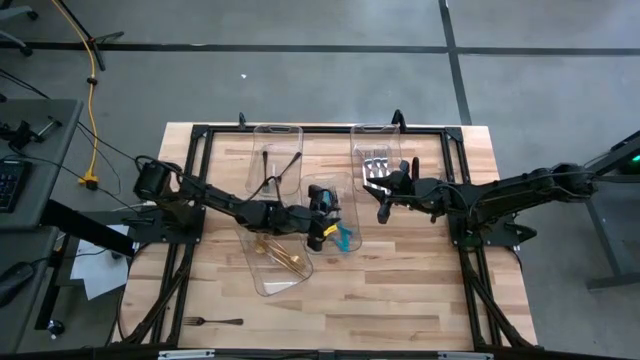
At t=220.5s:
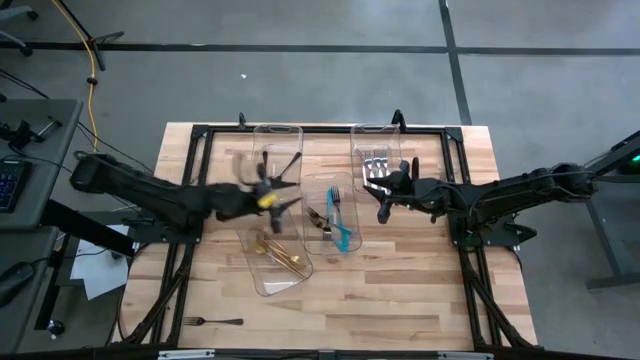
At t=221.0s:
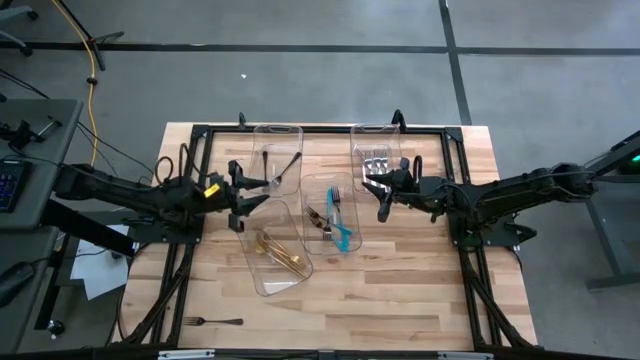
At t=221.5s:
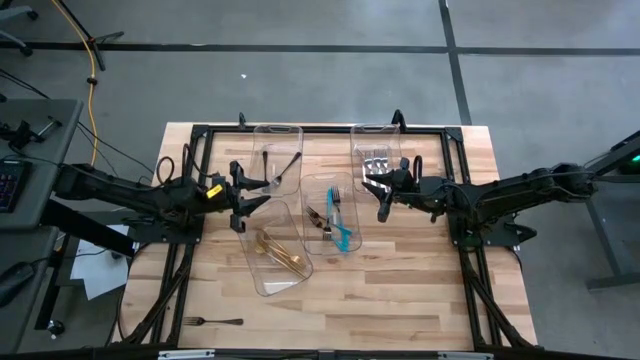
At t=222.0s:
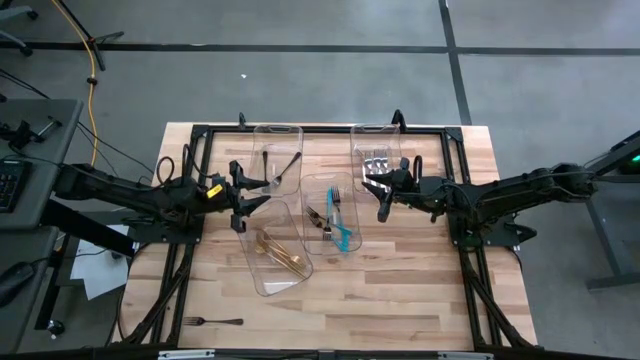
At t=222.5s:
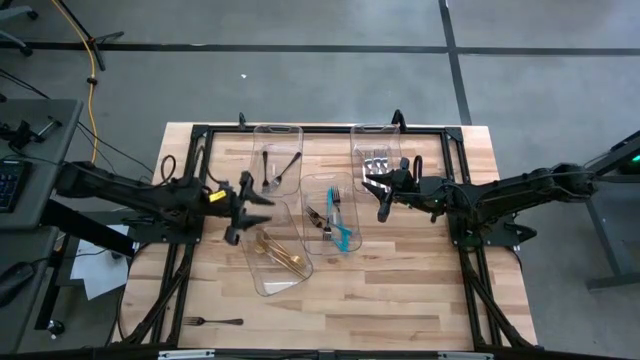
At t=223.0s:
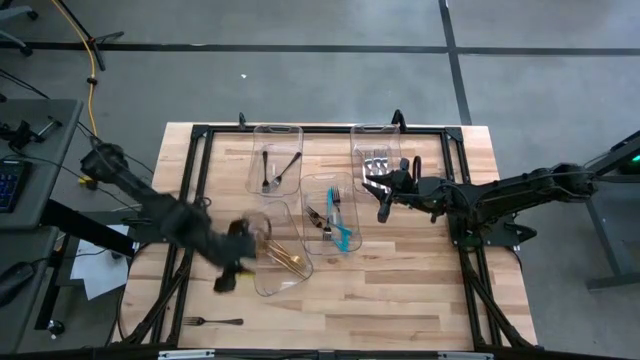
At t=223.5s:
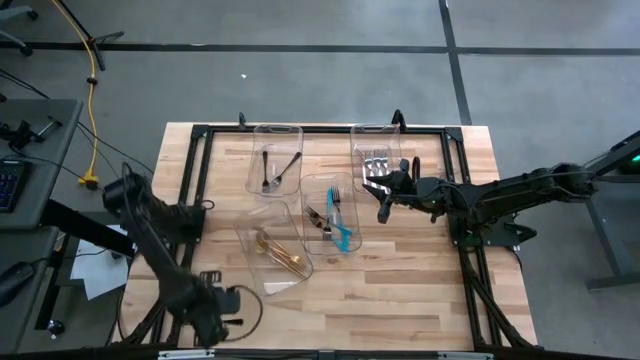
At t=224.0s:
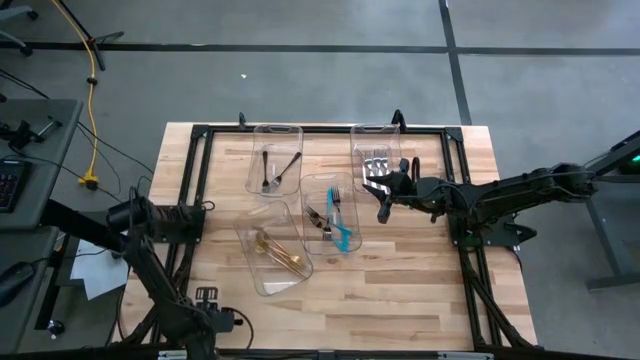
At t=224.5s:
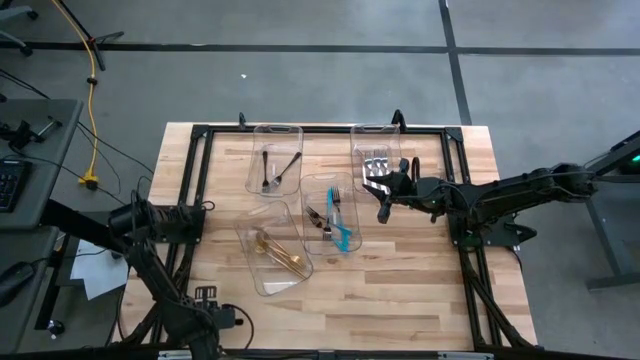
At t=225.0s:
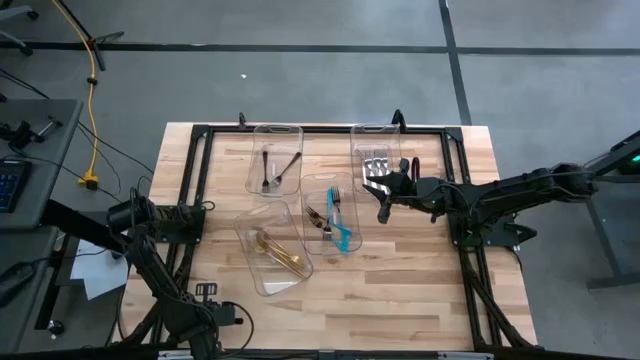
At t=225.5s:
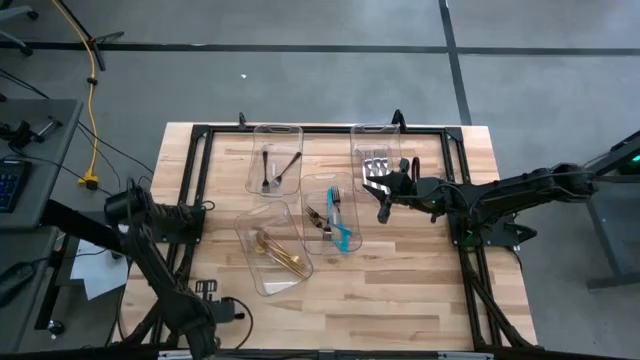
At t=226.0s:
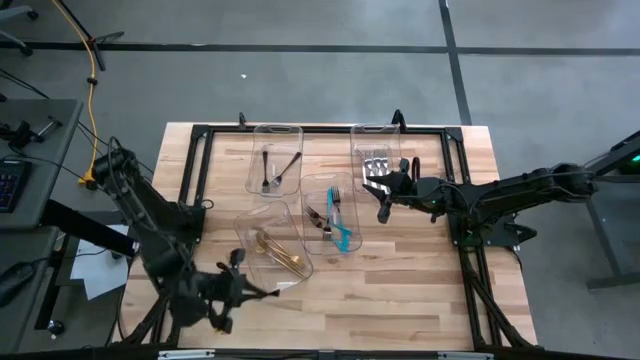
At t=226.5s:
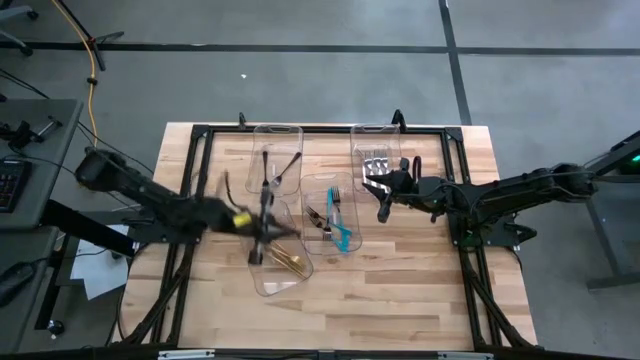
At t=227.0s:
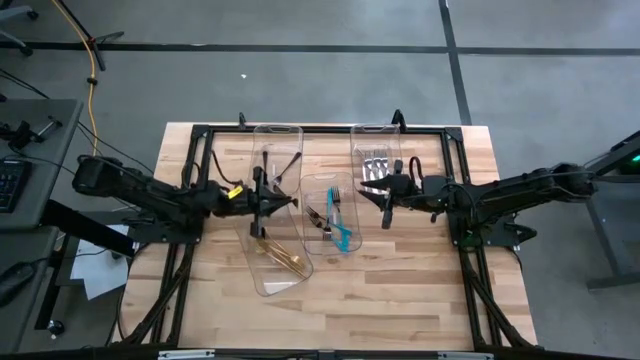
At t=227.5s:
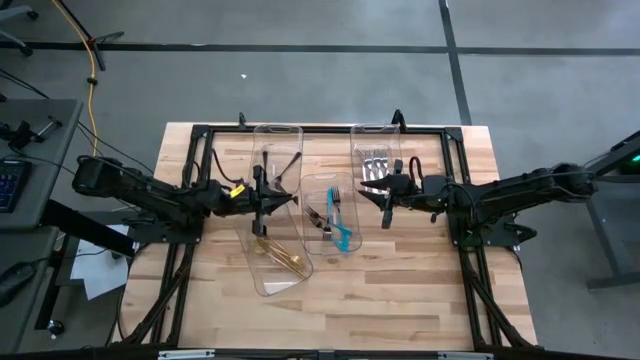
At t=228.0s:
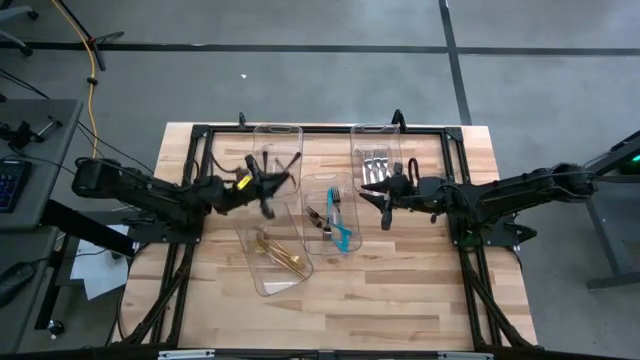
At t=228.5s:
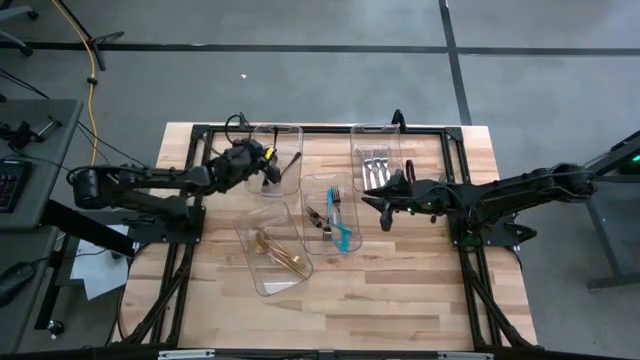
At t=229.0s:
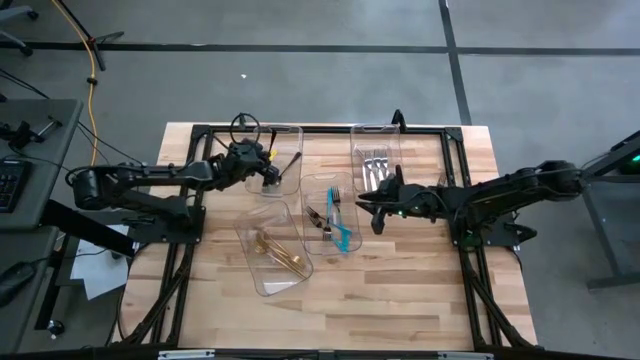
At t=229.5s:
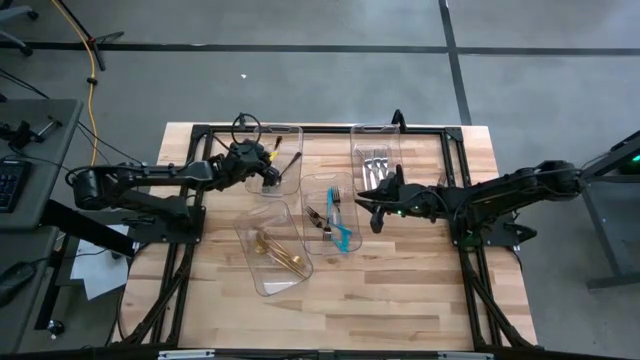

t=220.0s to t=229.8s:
Task: Sort silverware by color (type)
Put the black fork into the top left transparent bin

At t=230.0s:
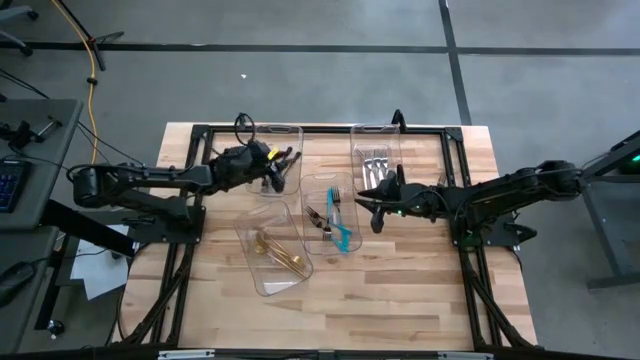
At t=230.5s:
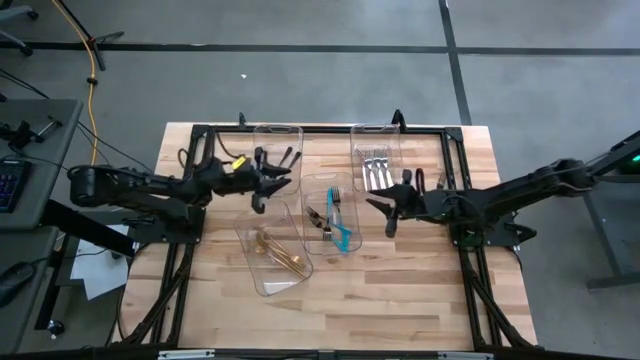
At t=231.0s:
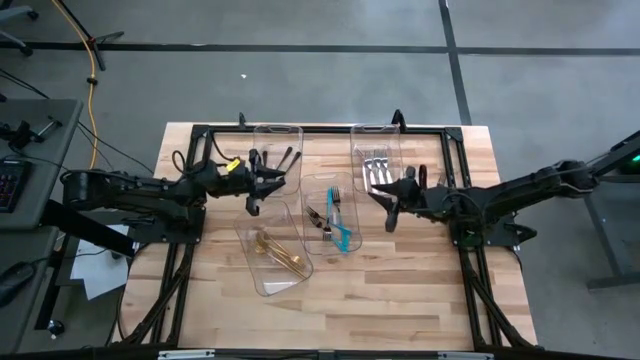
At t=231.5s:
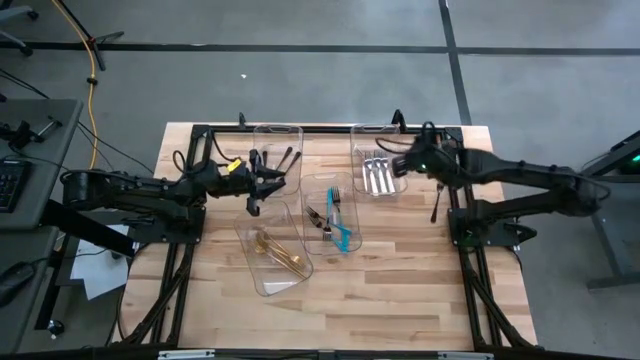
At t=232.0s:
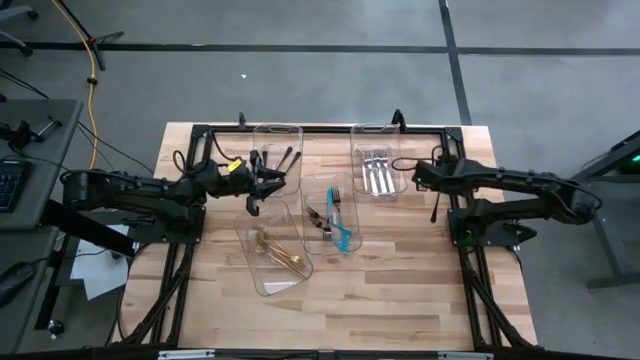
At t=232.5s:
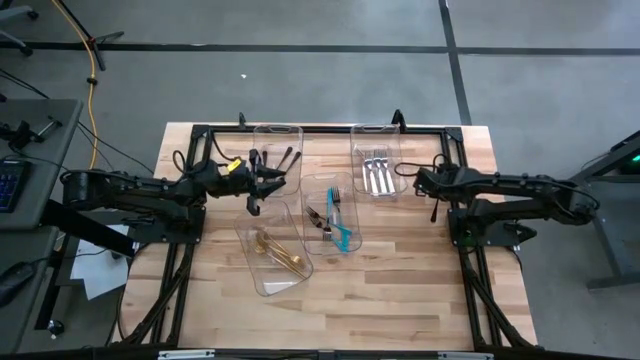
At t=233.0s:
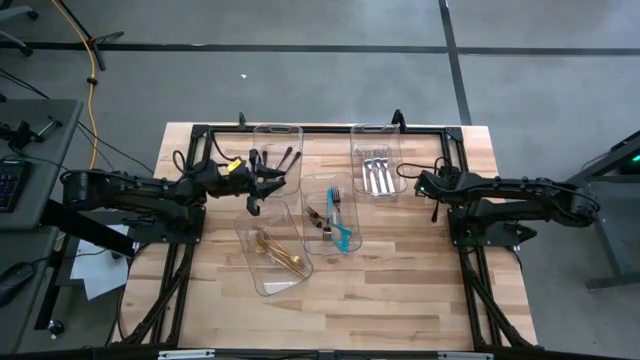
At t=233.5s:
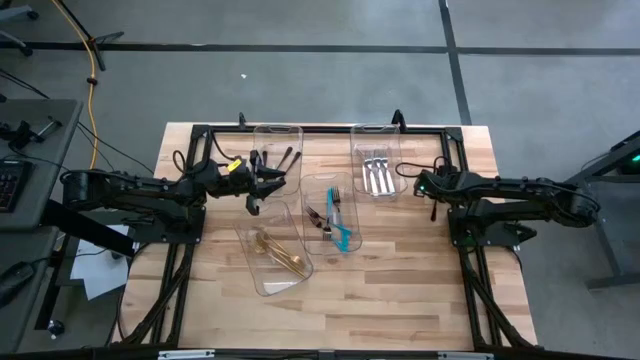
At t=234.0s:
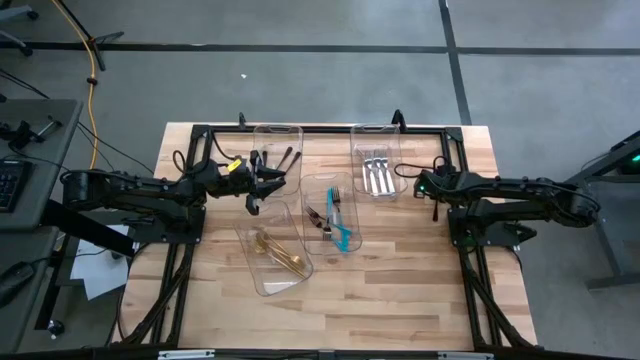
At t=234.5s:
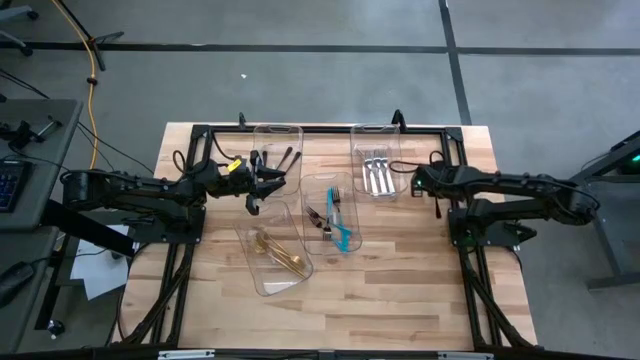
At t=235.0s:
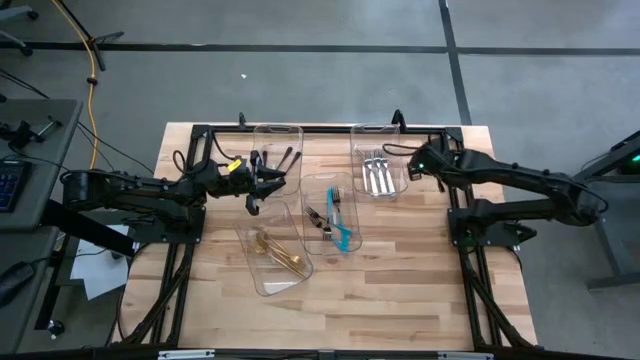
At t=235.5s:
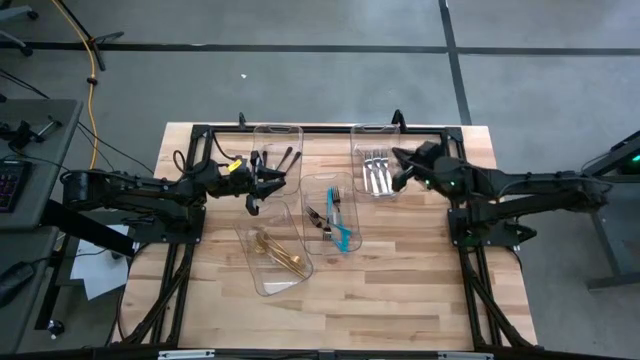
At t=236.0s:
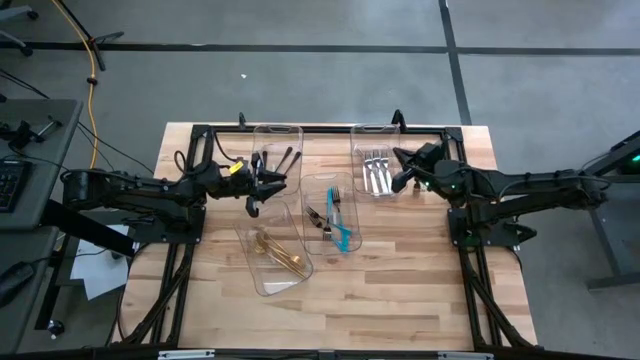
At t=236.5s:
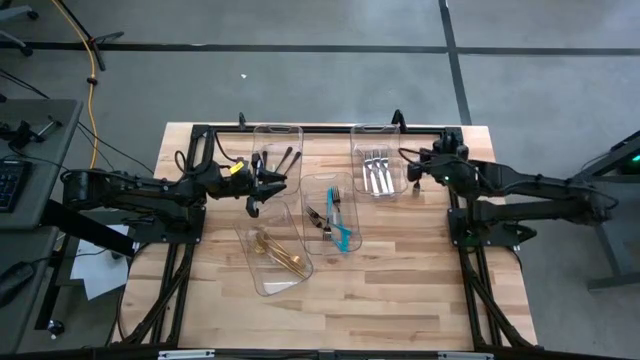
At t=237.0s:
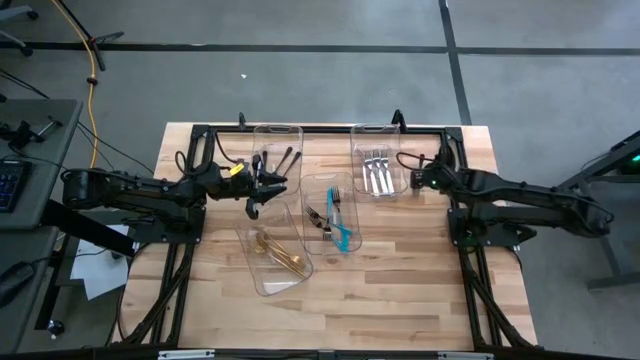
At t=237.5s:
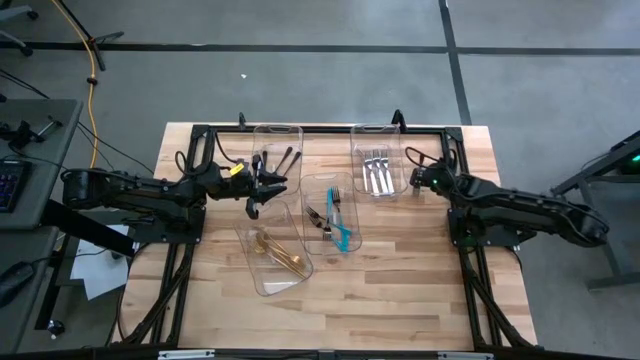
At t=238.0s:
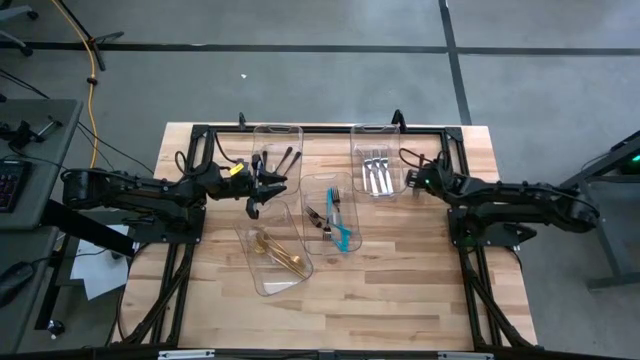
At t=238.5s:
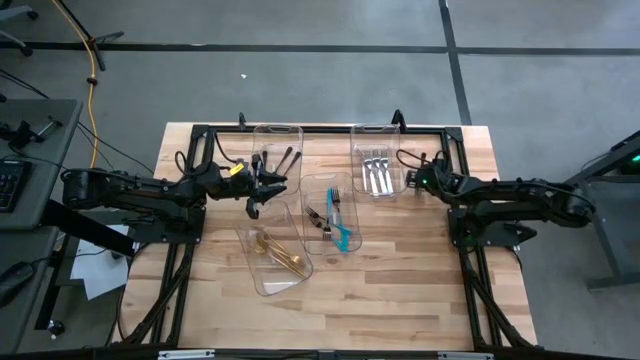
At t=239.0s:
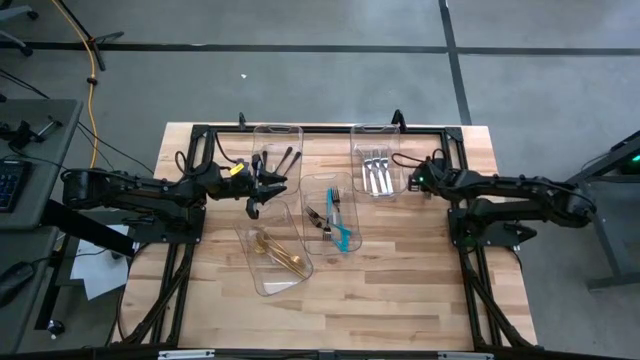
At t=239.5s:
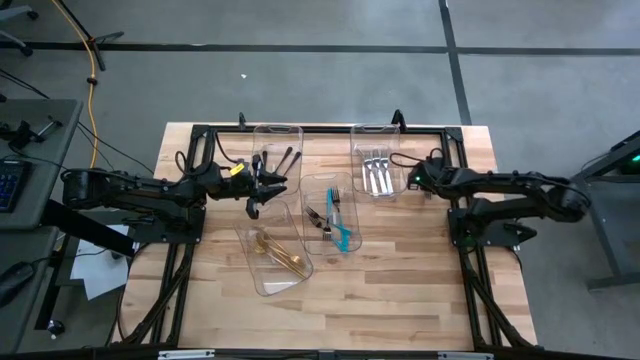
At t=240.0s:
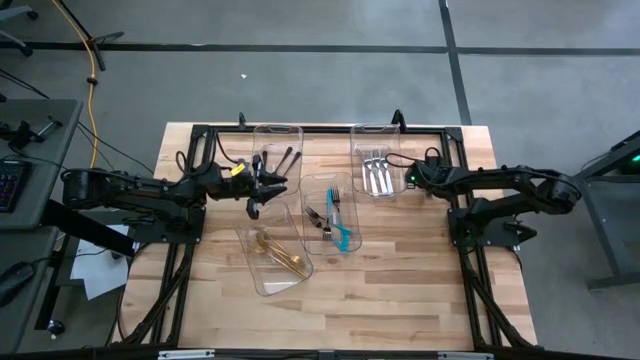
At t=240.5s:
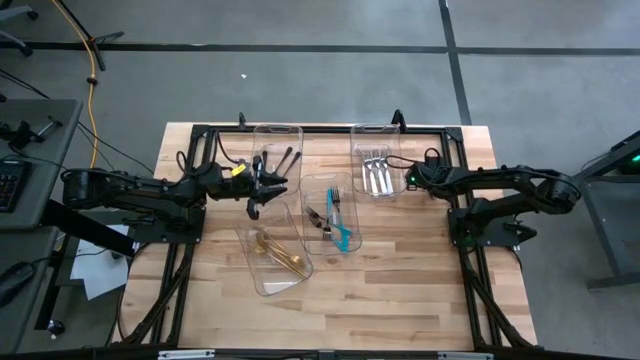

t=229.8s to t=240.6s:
Put the black fork into the top left transparent bin
